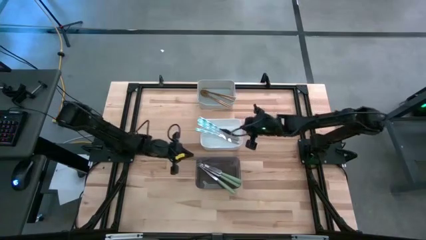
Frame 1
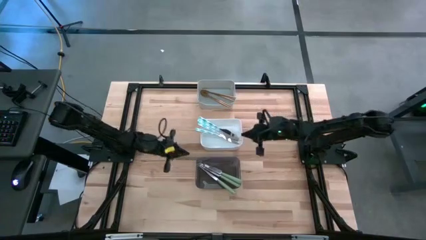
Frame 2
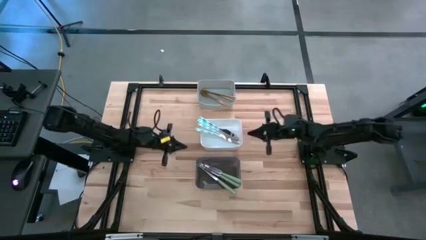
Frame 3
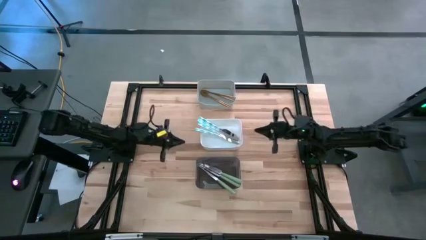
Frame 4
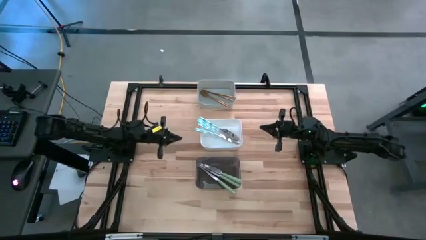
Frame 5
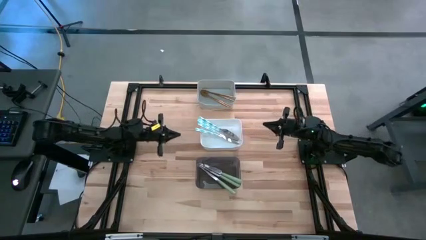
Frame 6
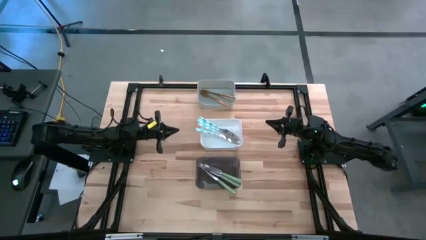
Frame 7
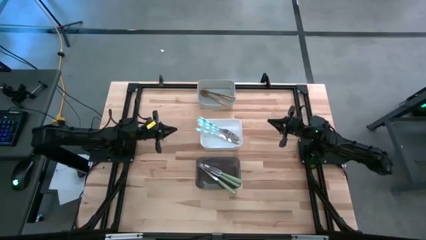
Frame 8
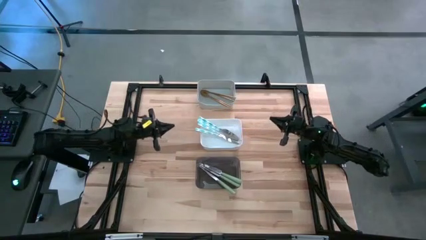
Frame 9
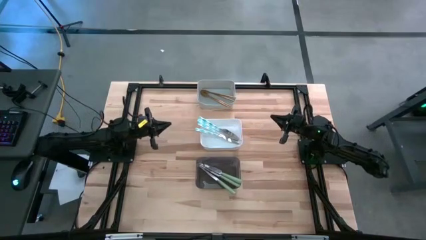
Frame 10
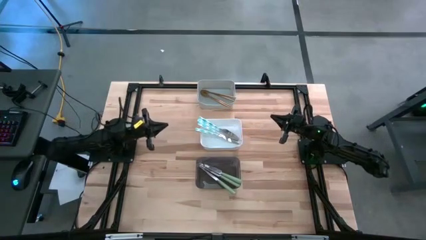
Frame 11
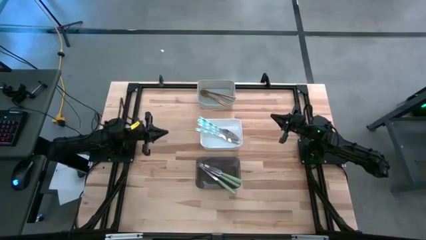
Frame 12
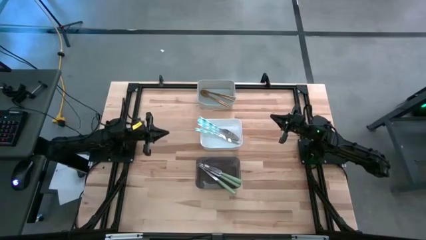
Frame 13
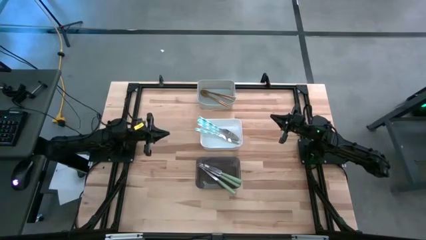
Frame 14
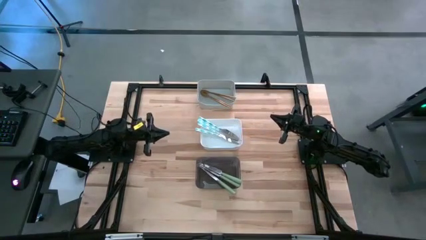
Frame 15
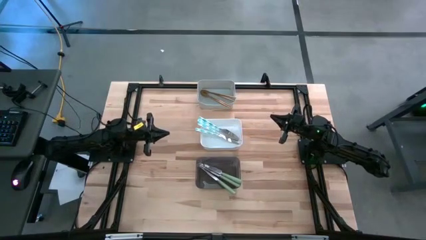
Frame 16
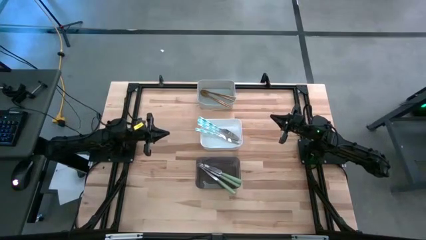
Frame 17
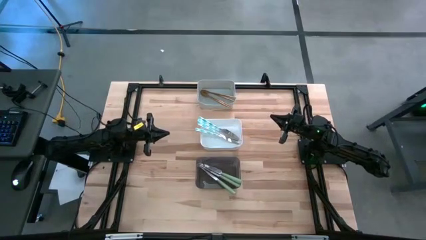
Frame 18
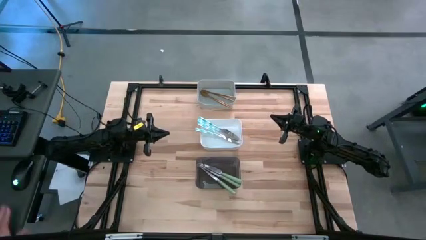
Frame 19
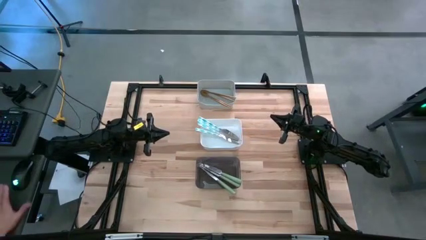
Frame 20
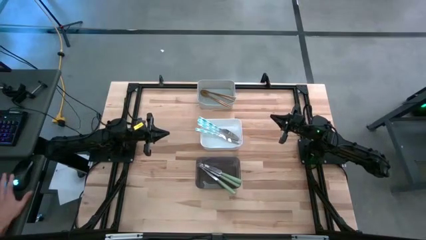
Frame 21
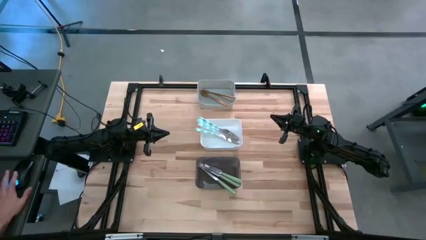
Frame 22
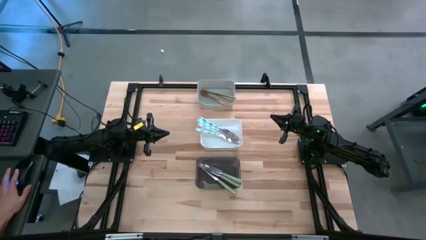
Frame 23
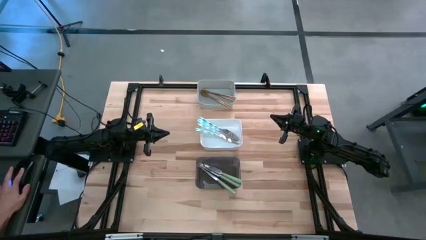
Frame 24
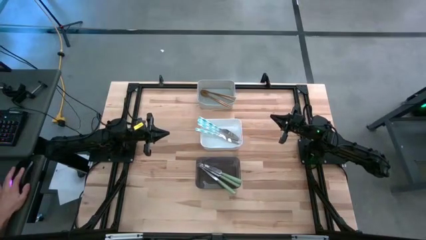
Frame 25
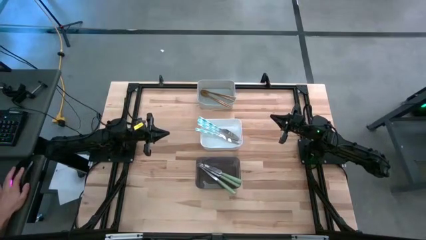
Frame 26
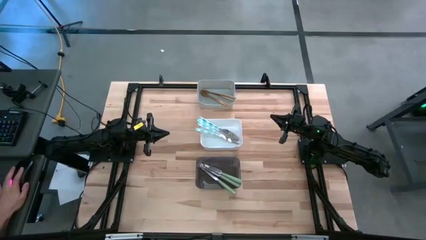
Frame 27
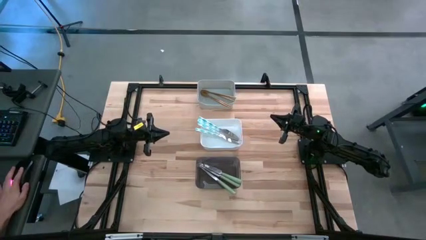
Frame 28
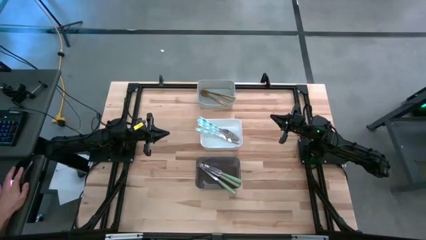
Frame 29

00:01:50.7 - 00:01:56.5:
Task: Sort silverware by color (type)
Return to Home Position

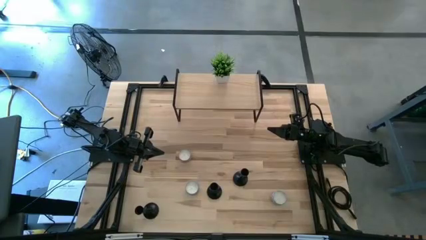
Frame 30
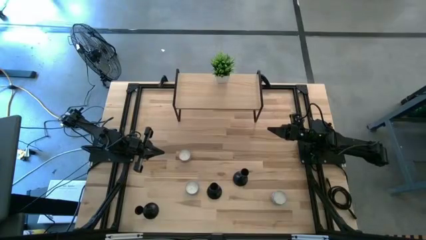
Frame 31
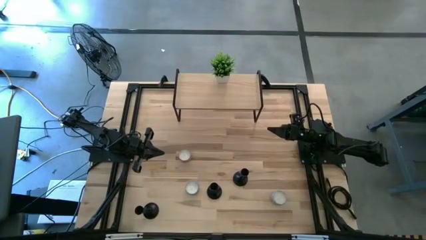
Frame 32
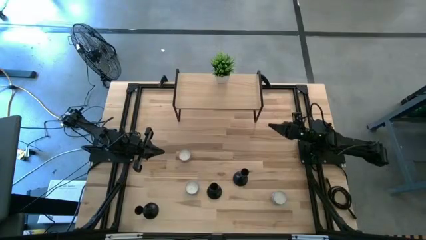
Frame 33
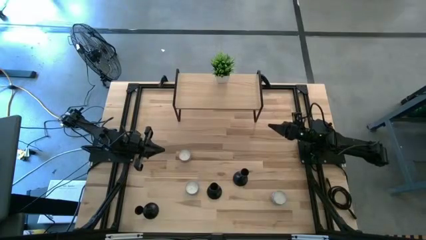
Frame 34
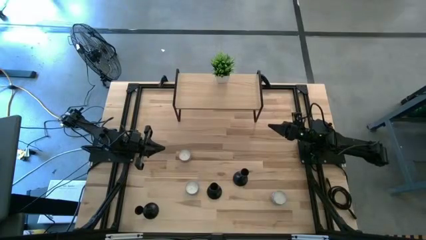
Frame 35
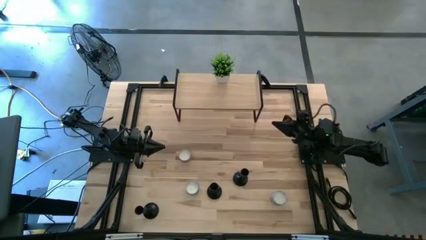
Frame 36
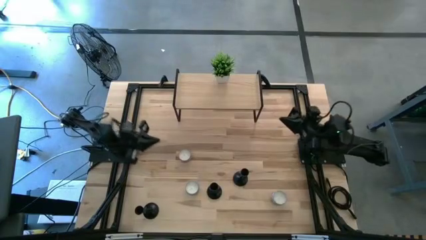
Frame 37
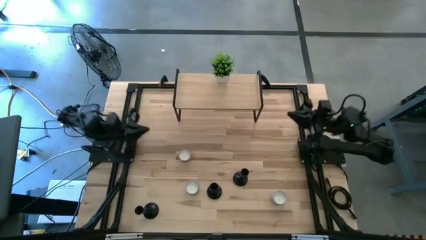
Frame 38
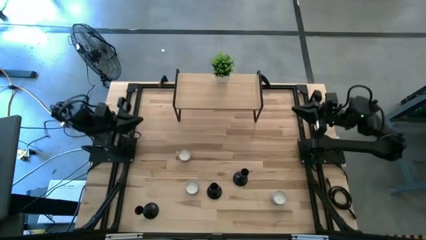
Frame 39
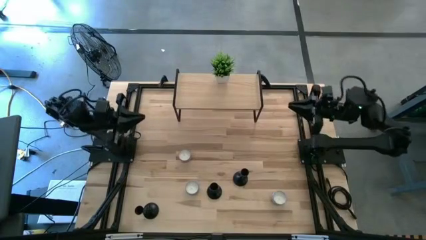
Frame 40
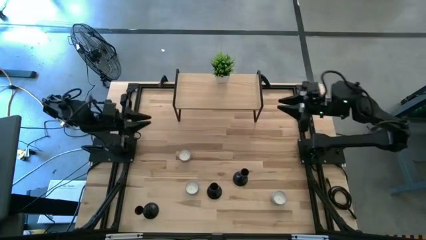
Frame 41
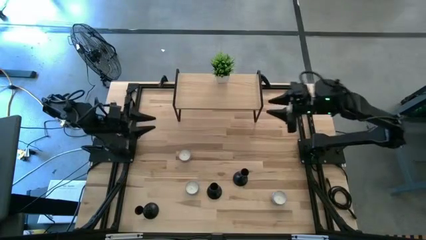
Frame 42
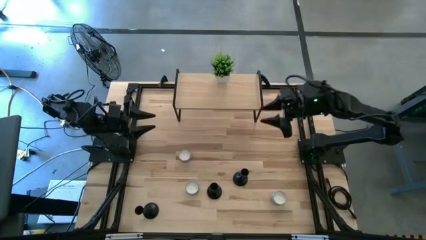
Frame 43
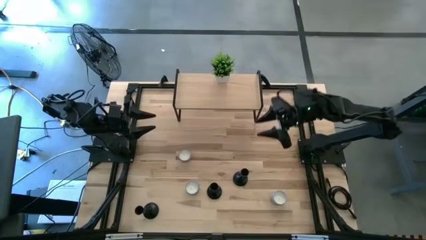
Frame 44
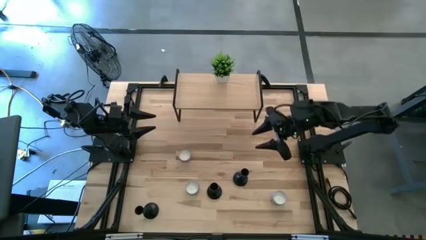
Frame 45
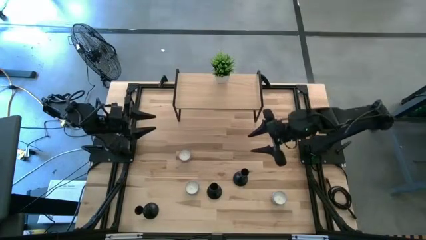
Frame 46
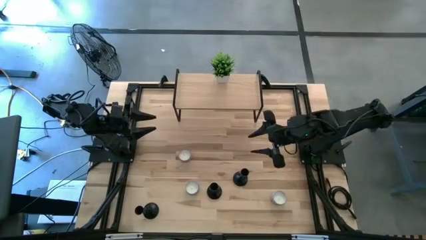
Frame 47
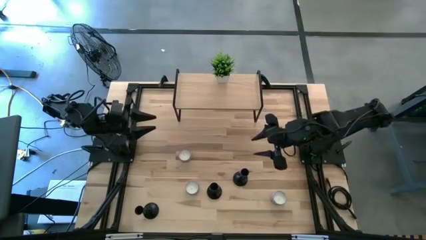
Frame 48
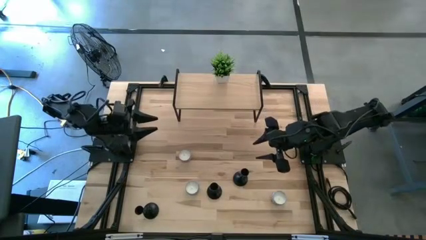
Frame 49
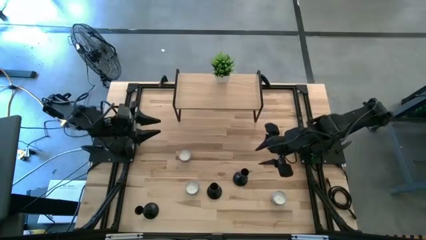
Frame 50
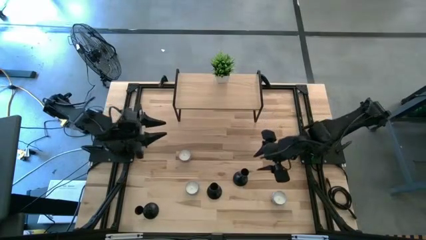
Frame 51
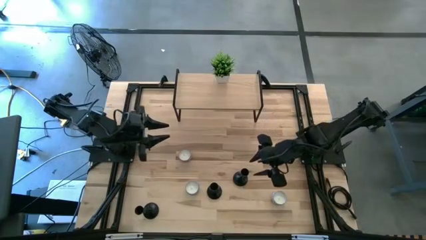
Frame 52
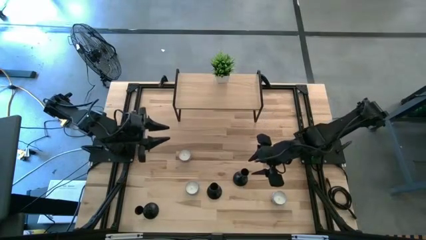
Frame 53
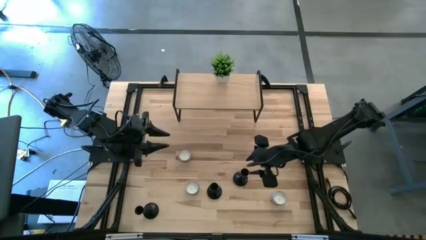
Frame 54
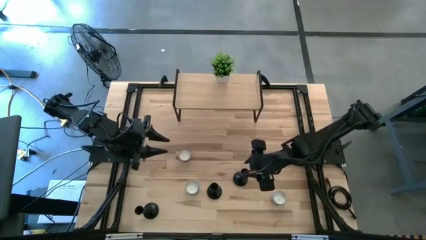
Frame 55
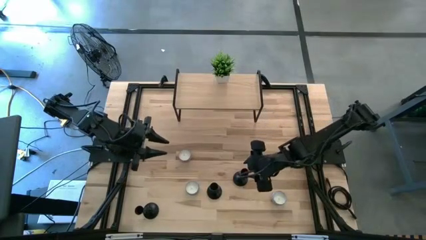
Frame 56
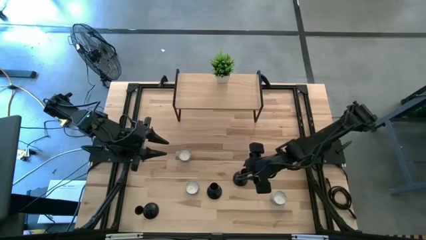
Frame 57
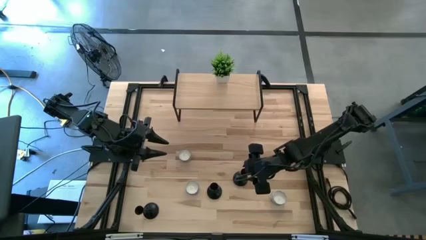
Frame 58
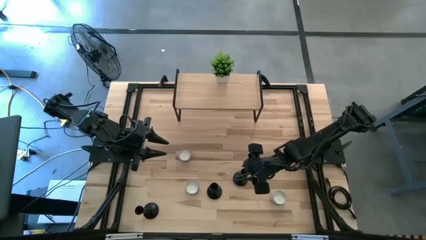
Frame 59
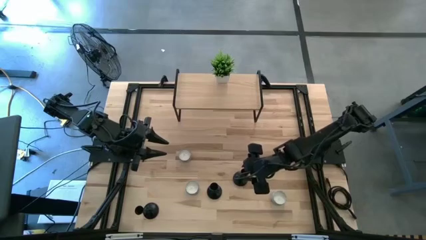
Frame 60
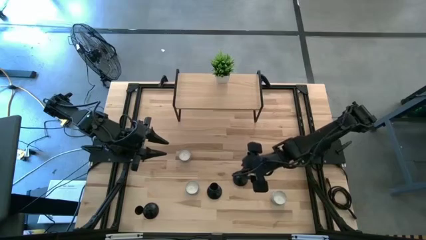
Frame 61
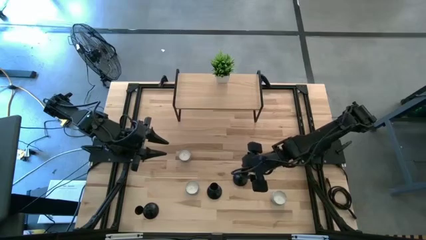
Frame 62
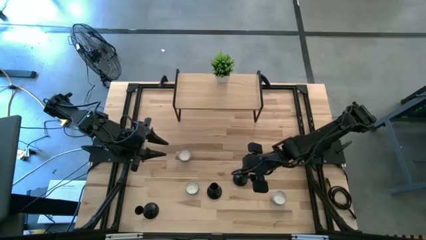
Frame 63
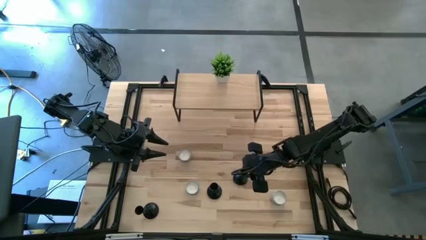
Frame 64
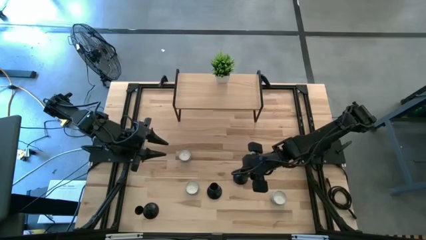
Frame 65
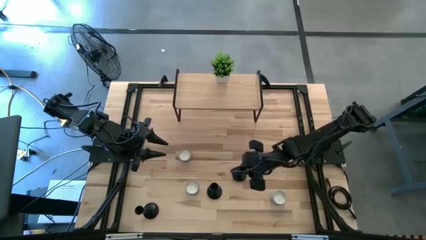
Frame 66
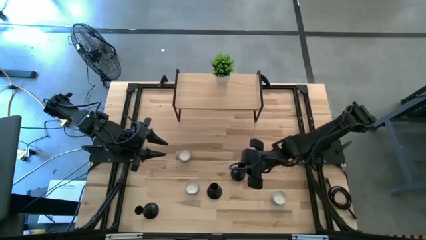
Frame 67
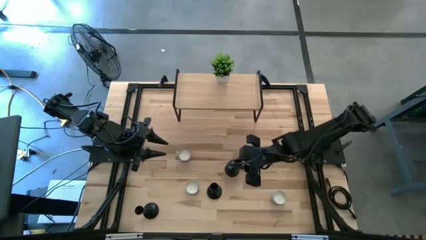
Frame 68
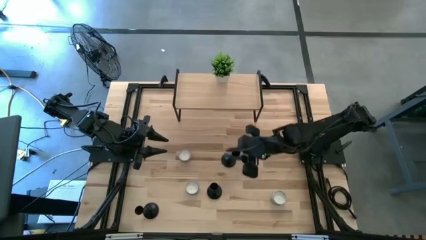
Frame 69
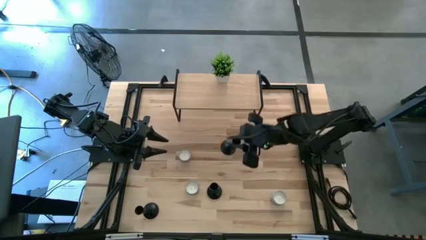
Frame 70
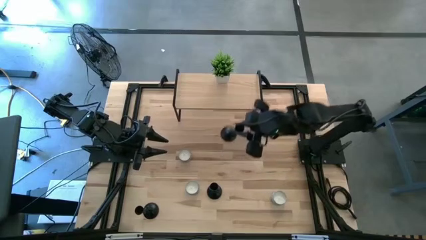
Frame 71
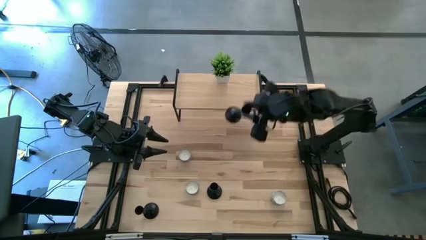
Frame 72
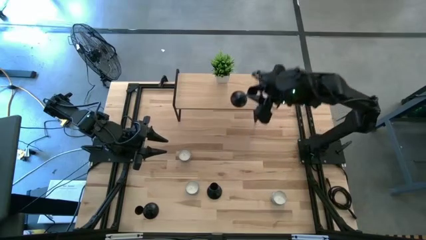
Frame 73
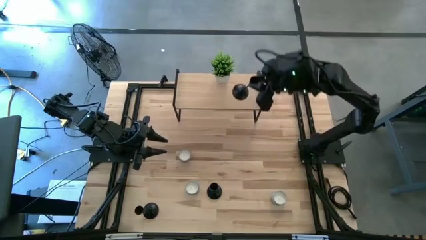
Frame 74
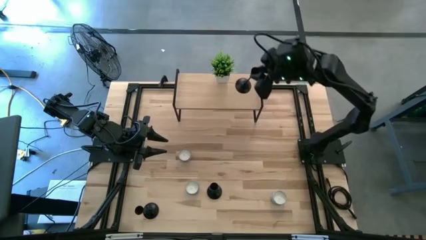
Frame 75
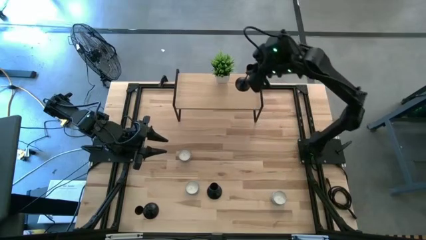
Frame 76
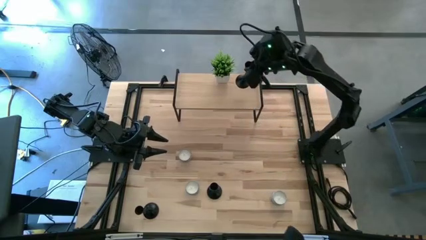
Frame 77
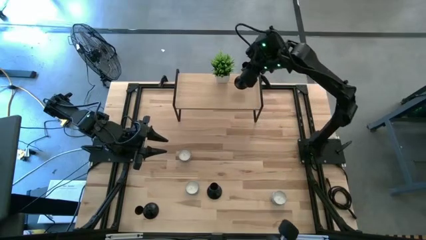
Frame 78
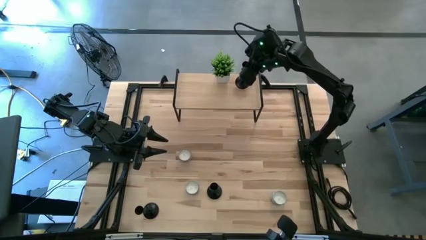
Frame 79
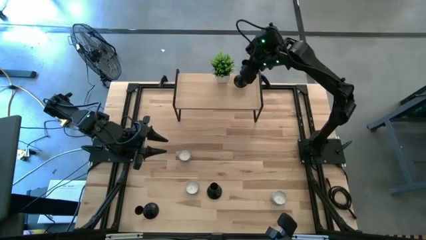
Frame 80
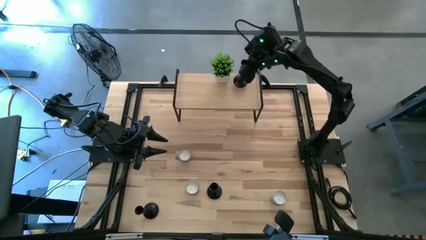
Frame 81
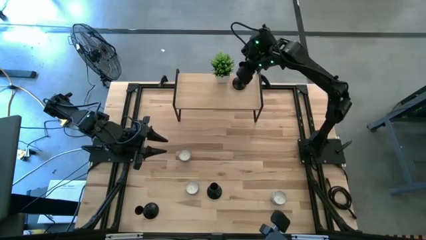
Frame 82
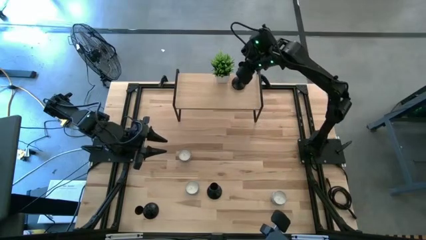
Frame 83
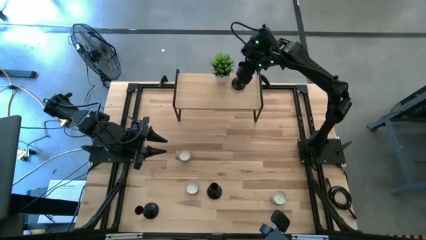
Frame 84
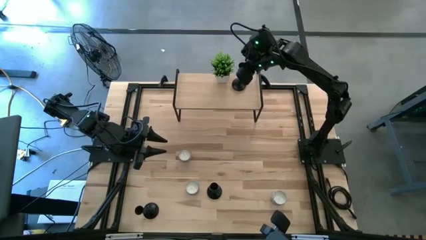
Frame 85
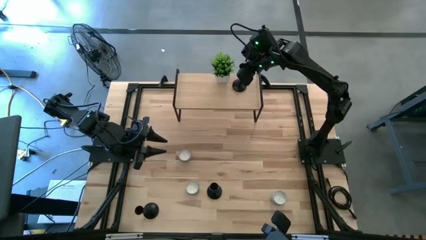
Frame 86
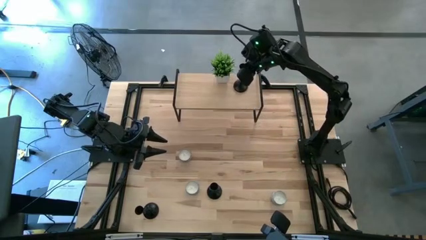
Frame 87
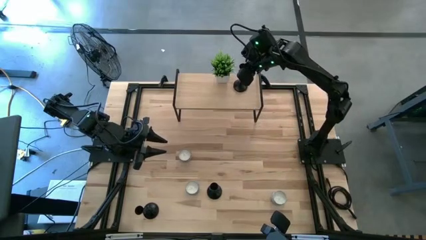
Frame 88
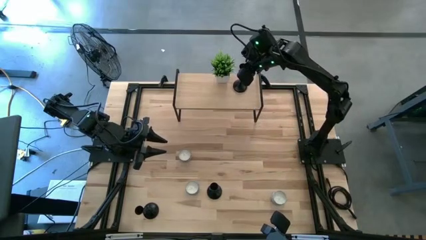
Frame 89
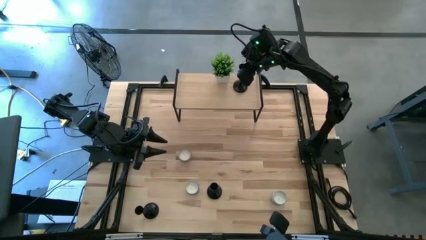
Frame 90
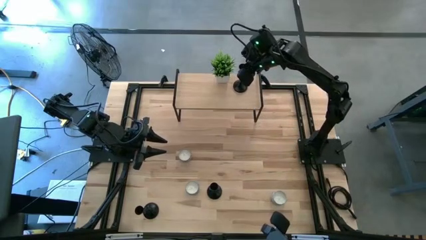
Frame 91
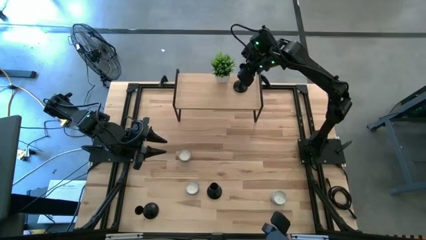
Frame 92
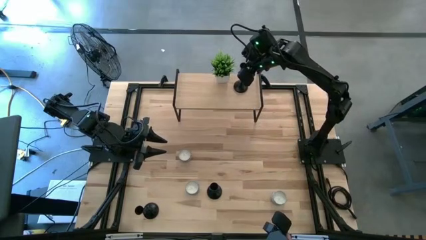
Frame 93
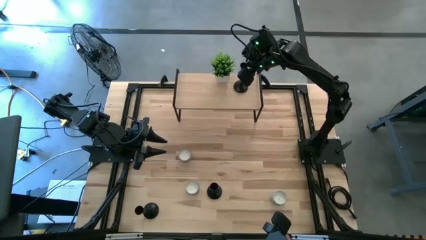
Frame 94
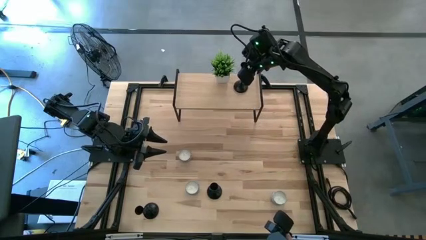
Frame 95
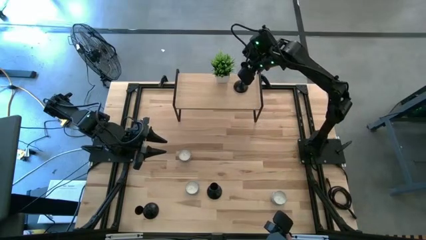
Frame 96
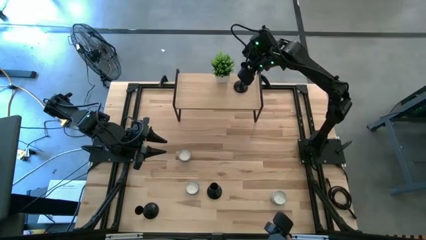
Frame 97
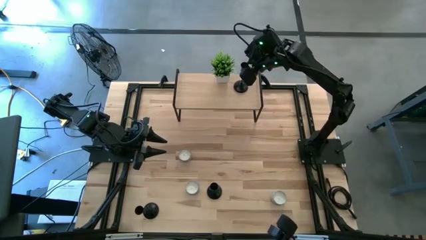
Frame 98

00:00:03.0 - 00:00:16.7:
Task: Pick & Place candle stick holders
Put the right black candle holder on the shelf
